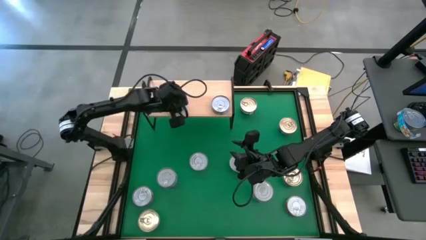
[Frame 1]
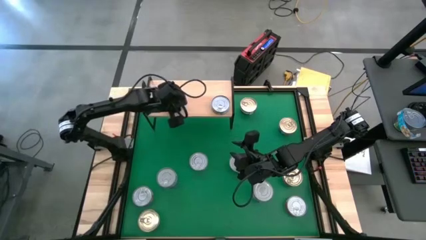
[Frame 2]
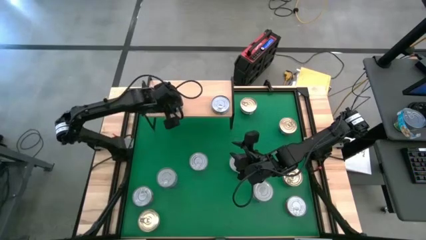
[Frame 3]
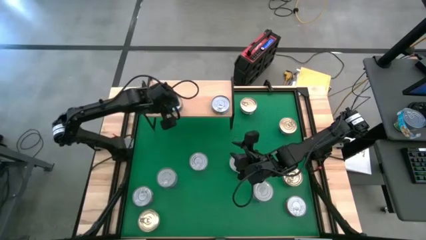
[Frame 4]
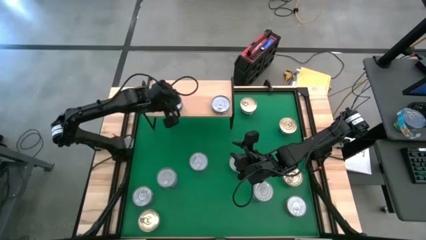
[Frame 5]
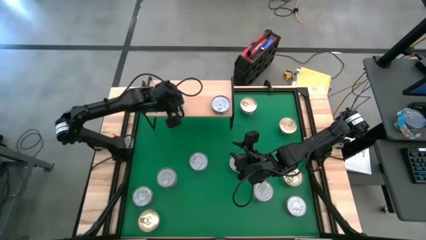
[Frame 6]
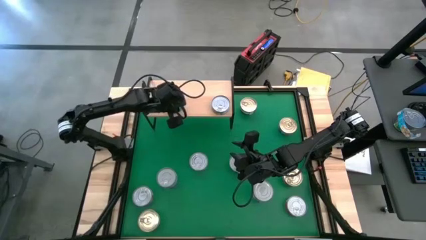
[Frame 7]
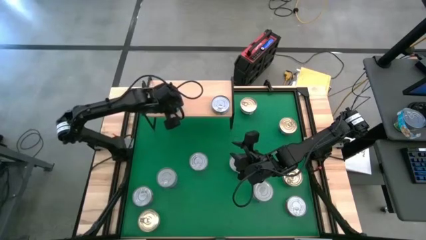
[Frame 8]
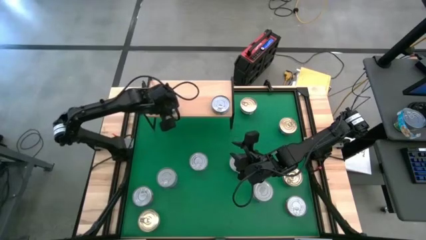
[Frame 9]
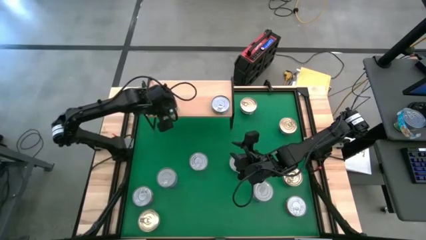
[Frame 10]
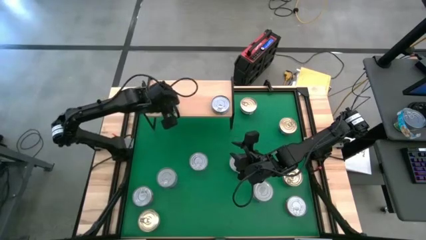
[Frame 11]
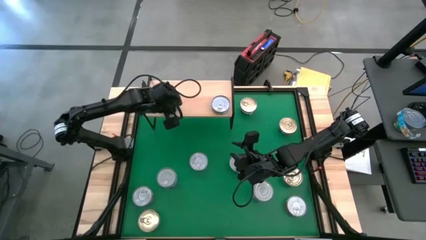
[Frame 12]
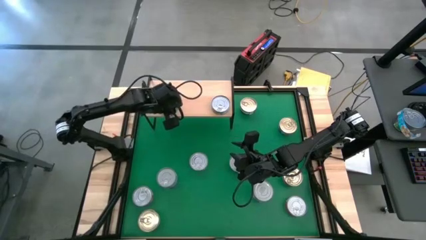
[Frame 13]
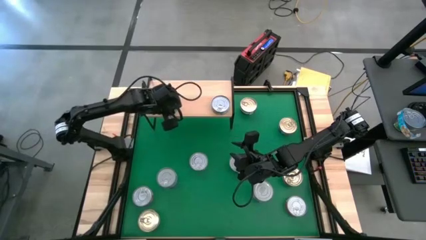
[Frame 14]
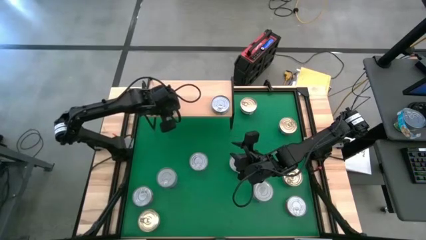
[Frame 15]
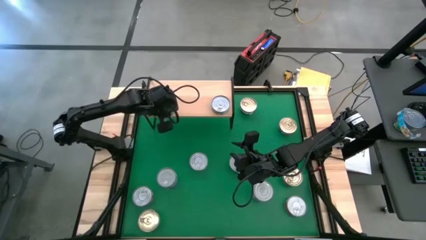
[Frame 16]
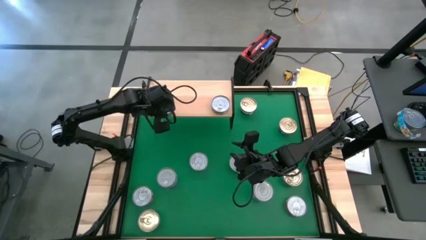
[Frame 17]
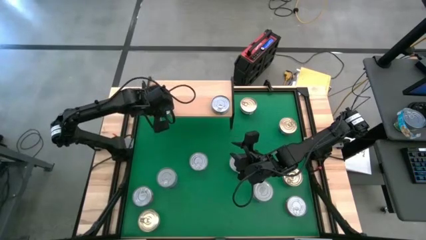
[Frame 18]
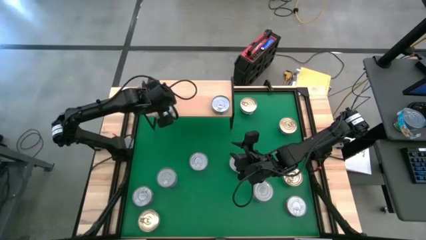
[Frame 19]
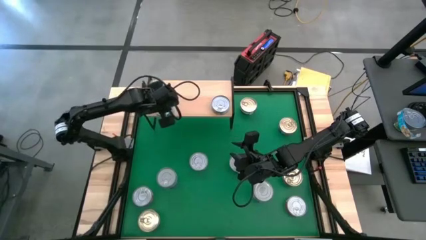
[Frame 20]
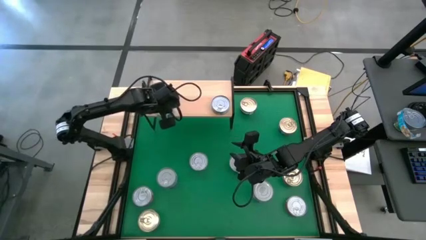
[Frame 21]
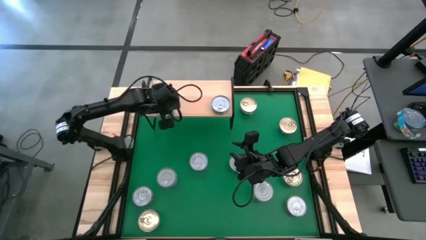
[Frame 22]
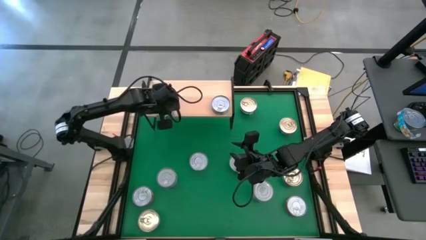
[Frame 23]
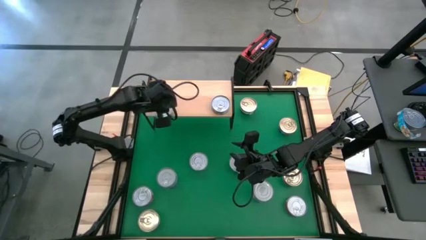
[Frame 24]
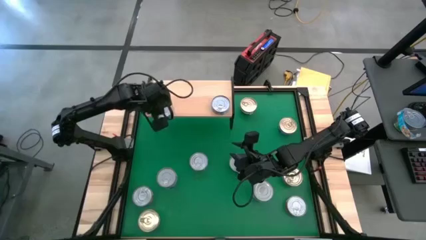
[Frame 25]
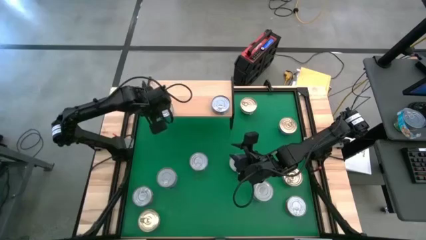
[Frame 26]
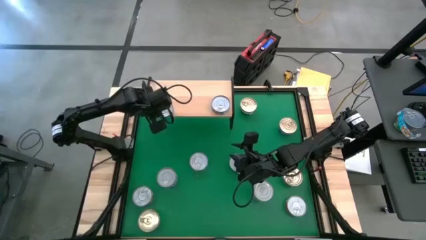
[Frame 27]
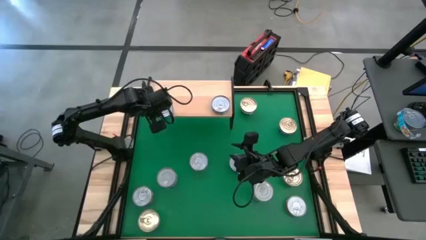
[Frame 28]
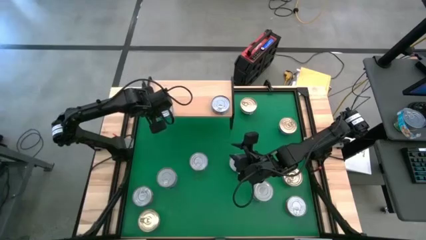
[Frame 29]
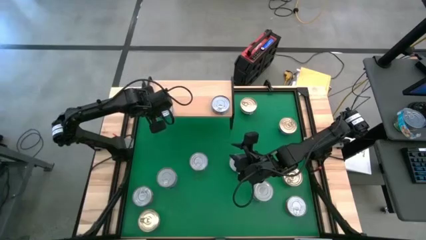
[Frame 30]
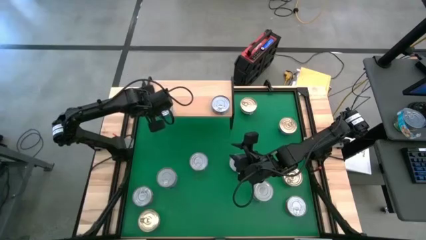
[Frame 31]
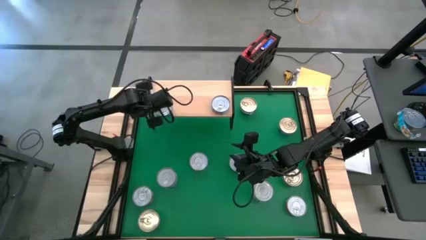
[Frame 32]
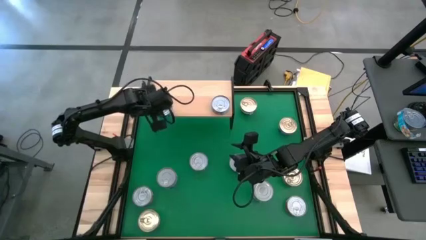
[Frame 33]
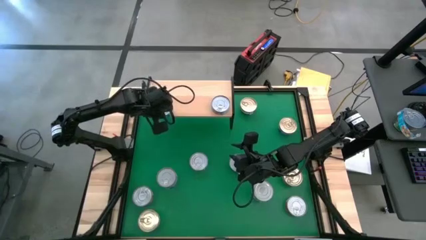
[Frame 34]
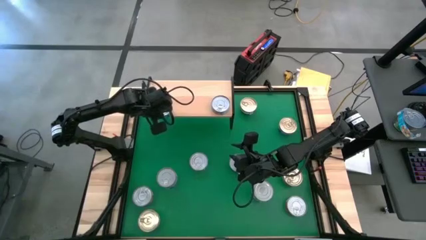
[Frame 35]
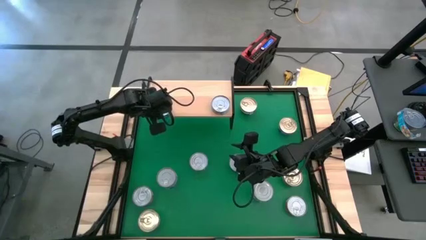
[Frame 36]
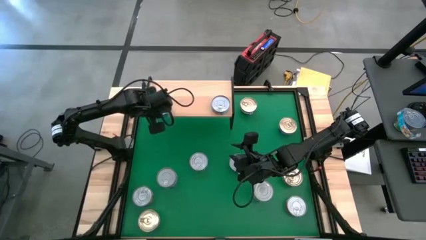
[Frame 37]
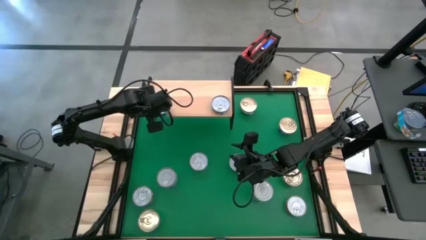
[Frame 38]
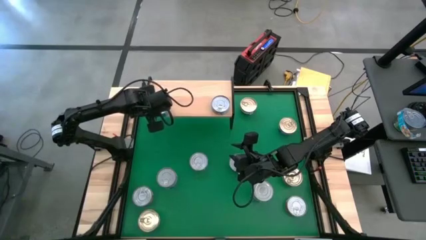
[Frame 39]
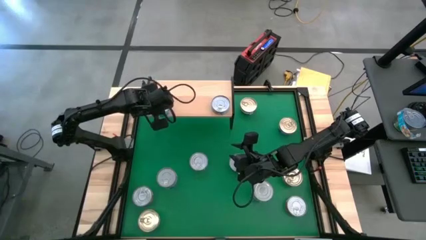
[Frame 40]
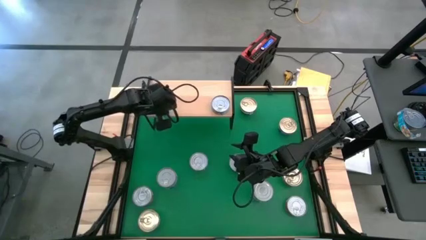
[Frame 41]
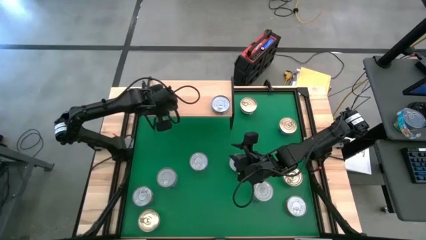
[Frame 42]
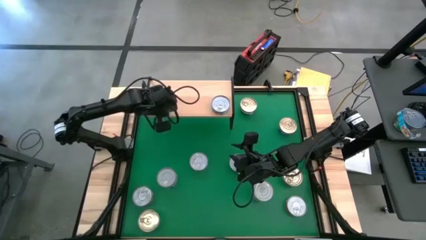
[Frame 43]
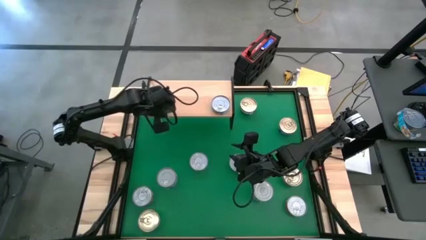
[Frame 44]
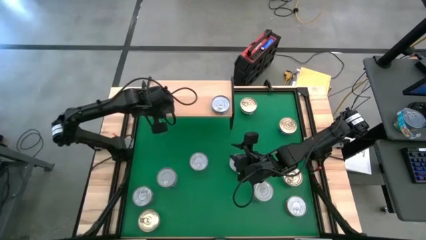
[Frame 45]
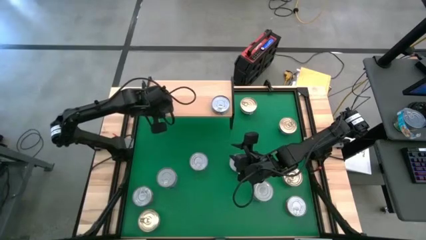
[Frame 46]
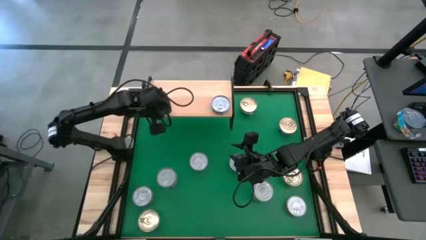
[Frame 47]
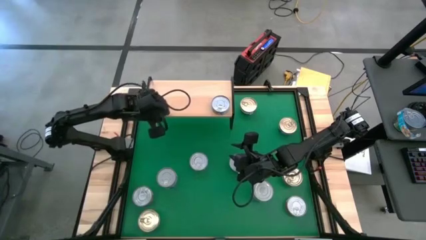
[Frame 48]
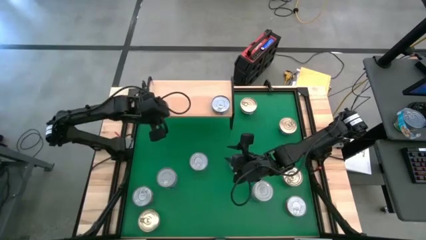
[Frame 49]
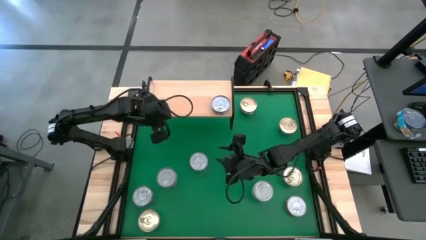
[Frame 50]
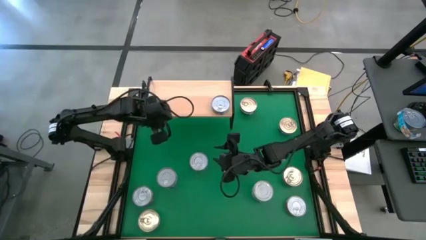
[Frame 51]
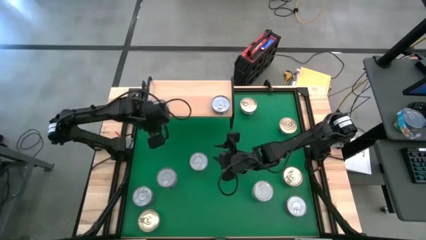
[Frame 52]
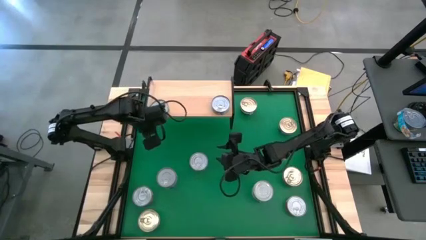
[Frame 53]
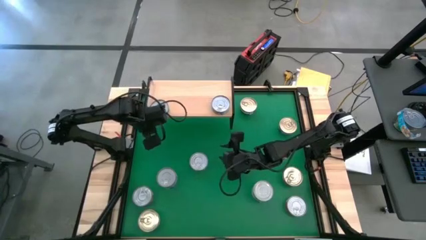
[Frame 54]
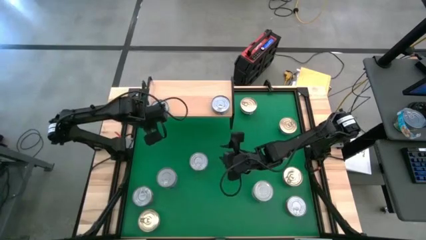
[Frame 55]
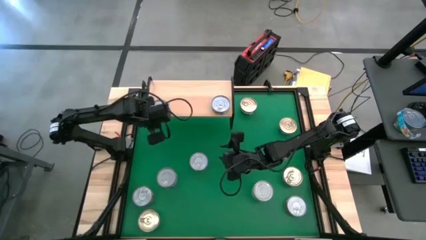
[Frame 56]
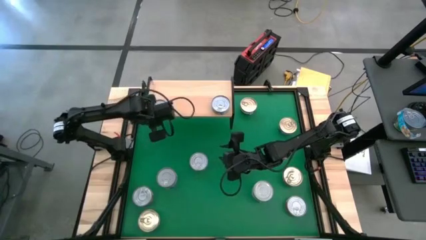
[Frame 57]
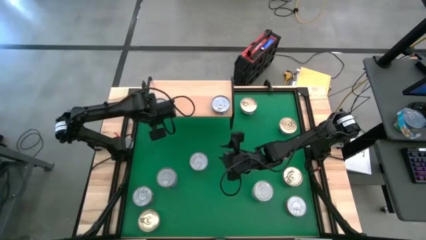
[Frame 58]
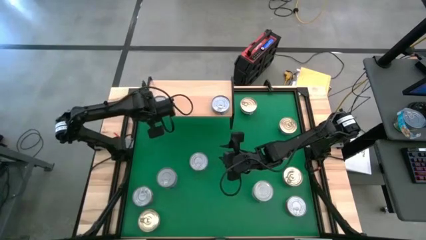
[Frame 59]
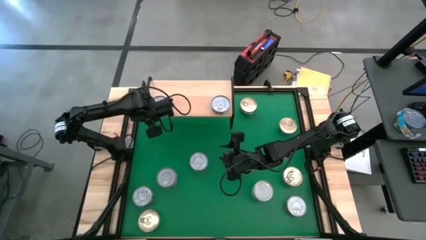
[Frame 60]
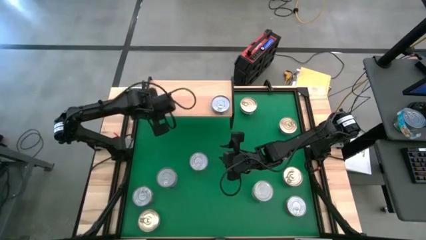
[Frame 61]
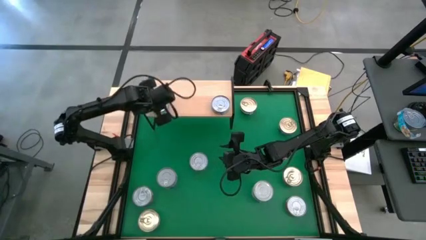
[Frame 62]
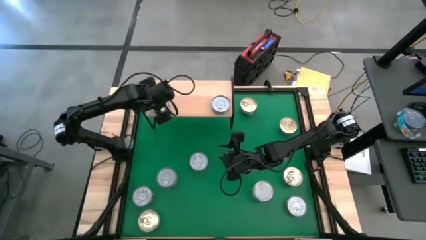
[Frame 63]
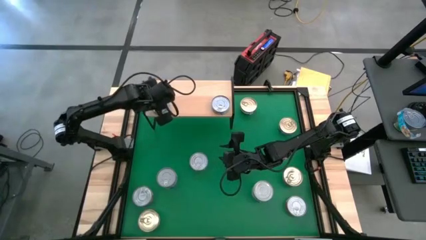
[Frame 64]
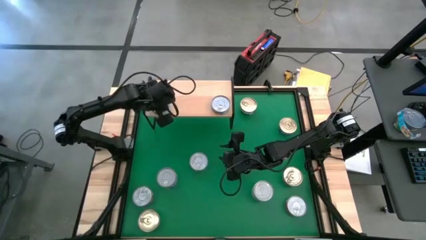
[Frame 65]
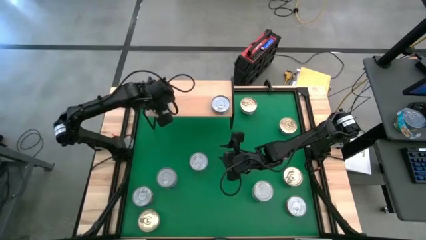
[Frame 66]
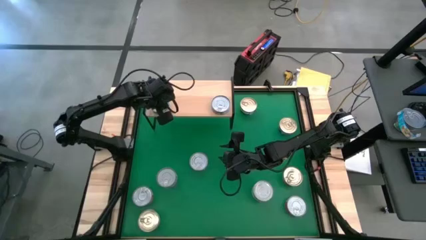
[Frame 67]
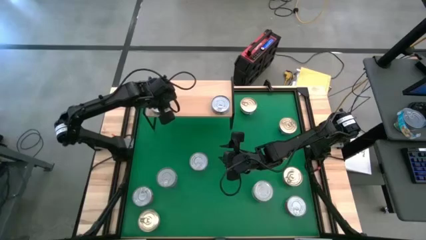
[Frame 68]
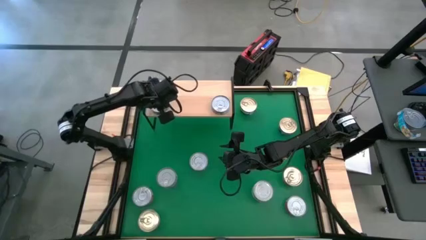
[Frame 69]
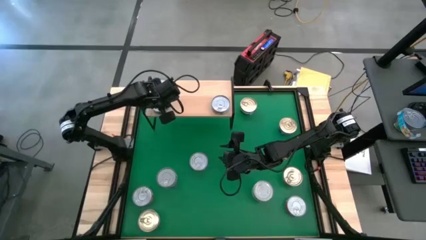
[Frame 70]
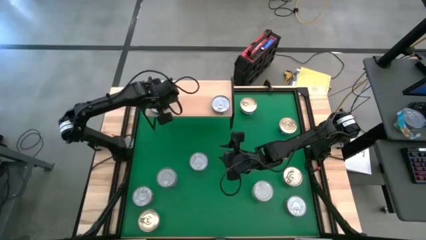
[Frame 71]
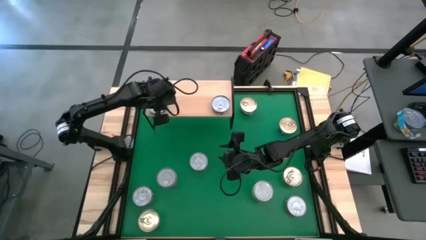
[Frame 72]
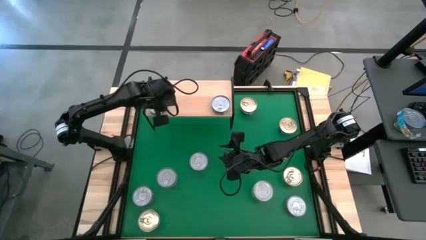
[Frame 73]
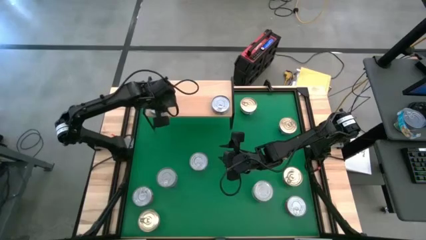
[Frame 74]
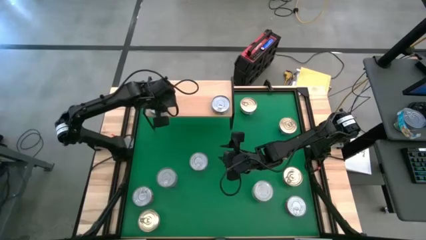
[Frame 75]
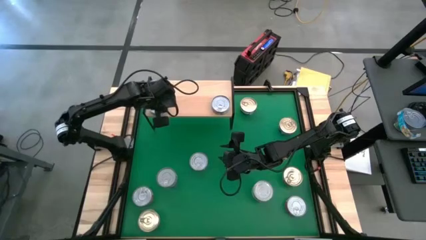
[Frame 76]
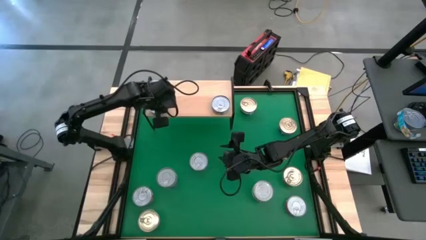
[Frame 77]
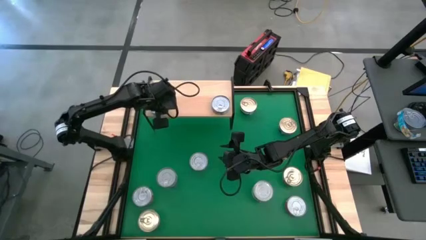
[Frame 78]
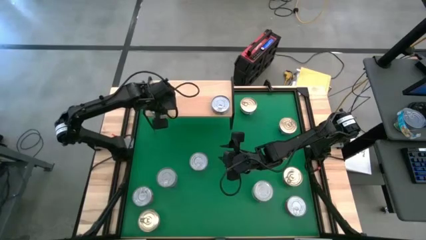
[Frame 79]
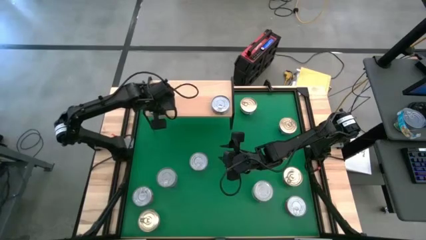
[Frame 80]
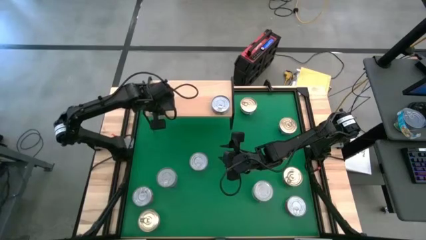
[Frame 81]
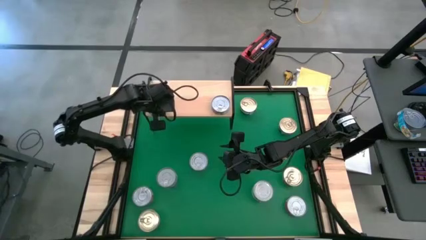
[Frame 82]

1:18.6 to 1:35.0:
Task: Stack canned seafood by type on shelf
Put the center light blue tuna can on the shelf
